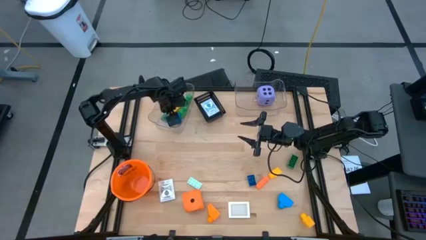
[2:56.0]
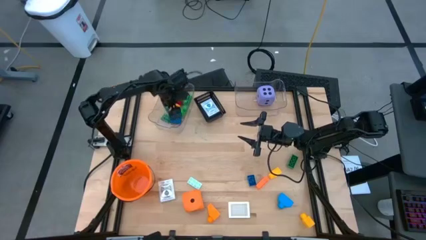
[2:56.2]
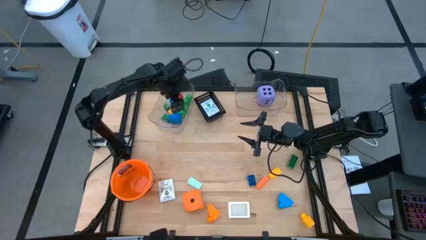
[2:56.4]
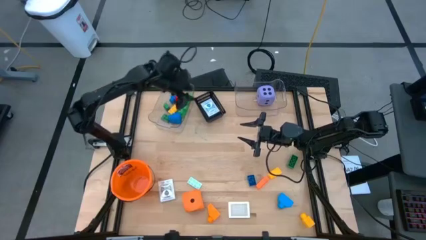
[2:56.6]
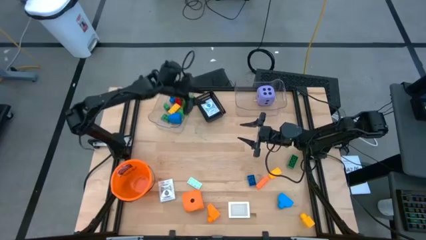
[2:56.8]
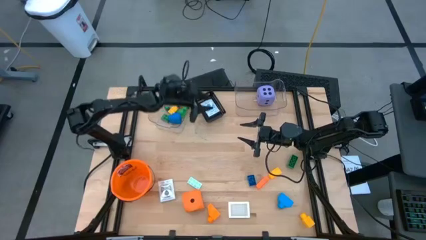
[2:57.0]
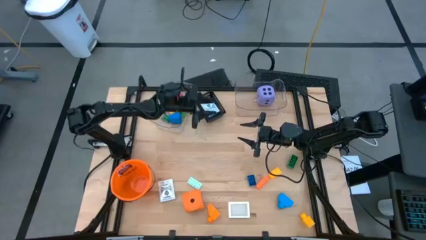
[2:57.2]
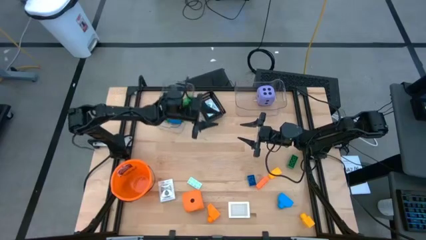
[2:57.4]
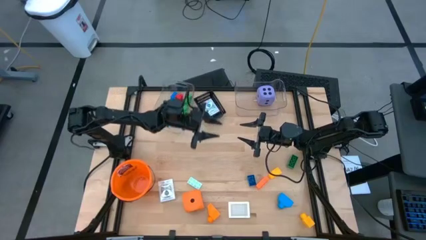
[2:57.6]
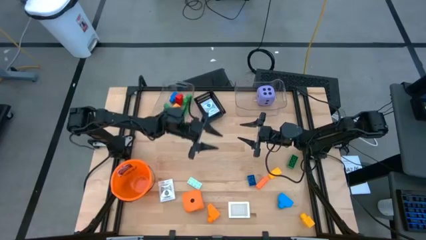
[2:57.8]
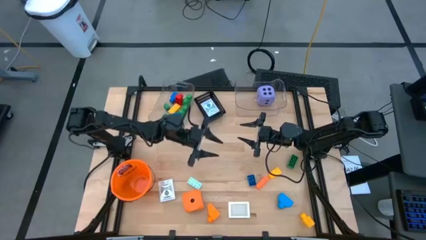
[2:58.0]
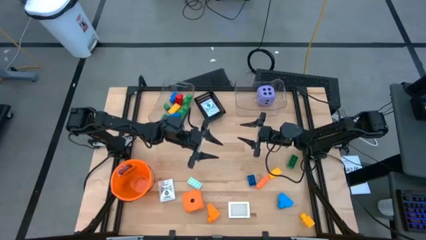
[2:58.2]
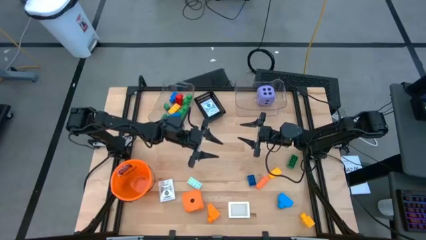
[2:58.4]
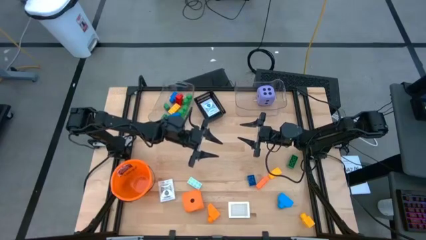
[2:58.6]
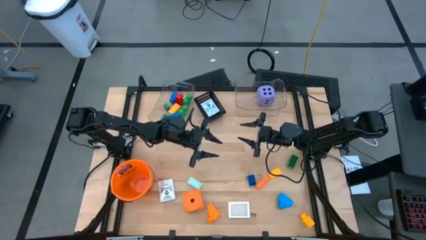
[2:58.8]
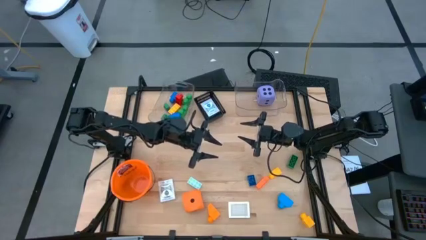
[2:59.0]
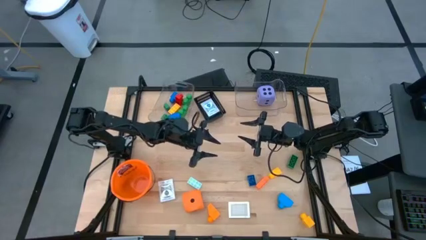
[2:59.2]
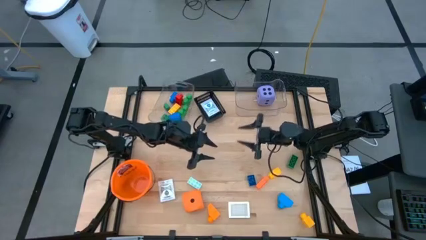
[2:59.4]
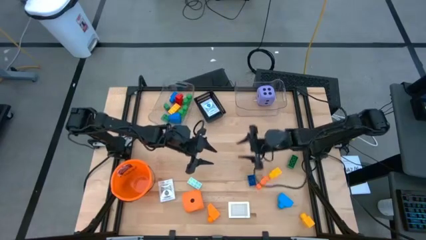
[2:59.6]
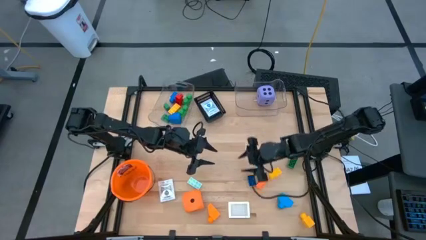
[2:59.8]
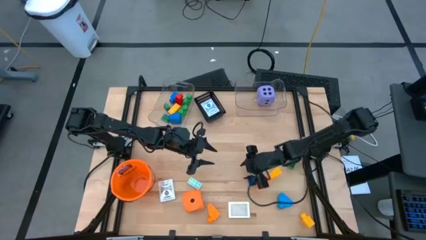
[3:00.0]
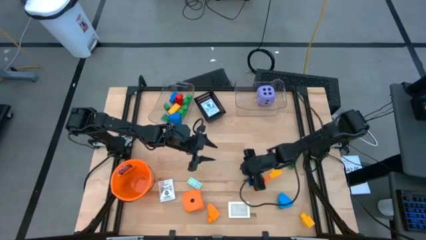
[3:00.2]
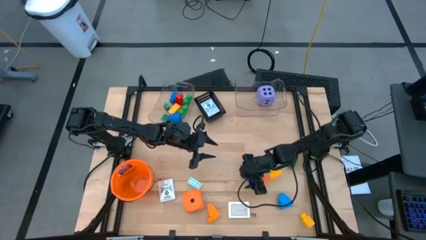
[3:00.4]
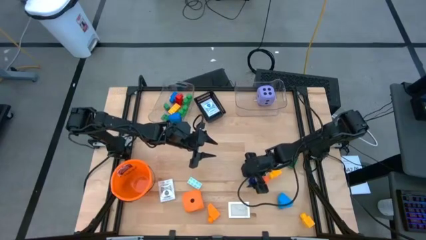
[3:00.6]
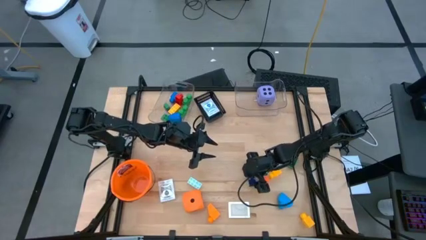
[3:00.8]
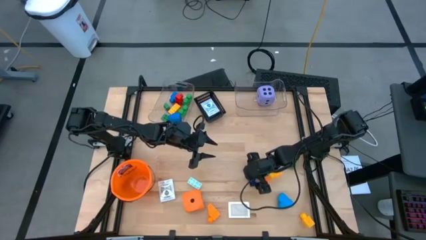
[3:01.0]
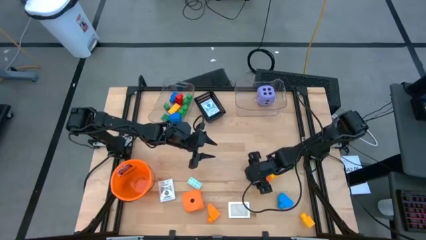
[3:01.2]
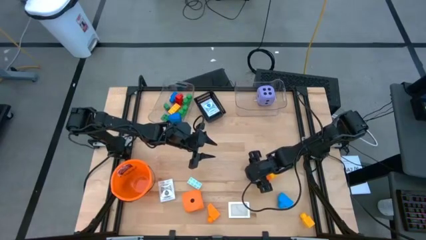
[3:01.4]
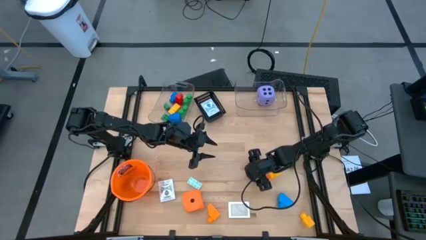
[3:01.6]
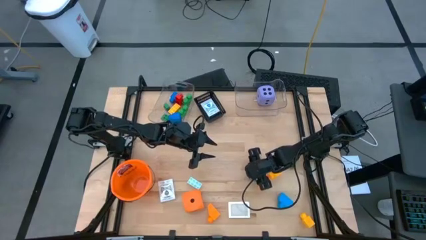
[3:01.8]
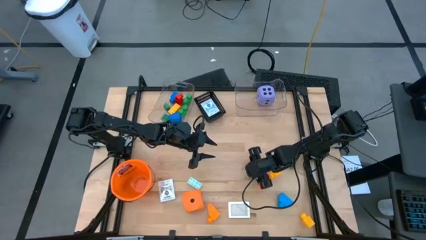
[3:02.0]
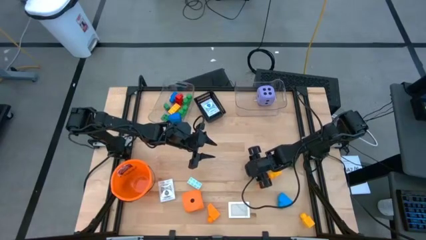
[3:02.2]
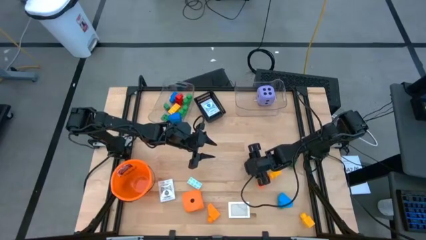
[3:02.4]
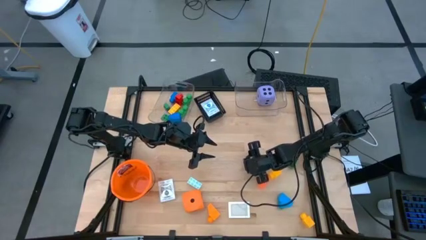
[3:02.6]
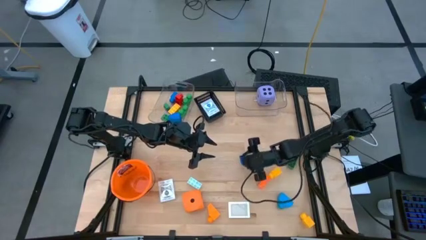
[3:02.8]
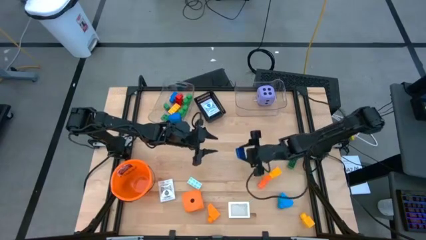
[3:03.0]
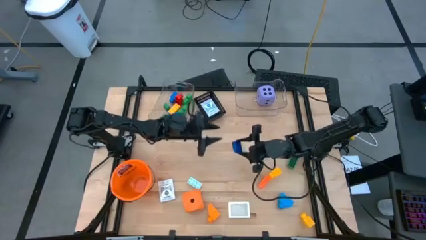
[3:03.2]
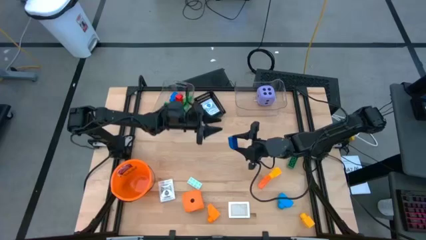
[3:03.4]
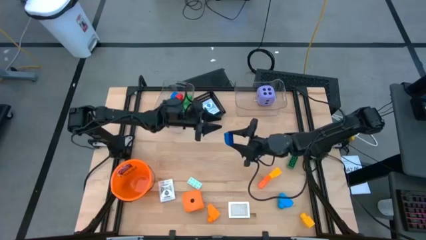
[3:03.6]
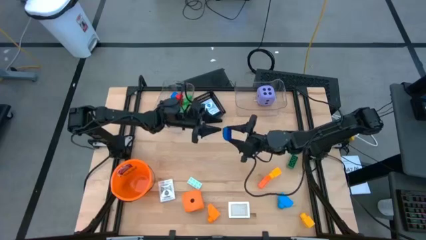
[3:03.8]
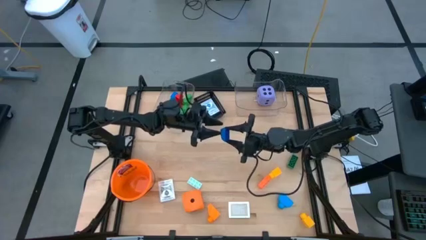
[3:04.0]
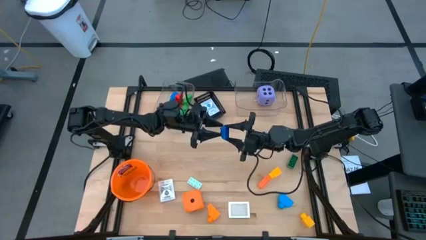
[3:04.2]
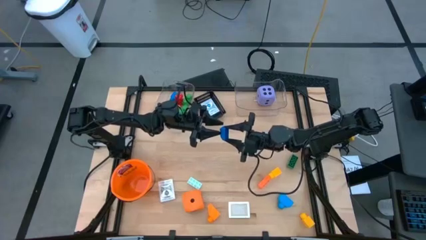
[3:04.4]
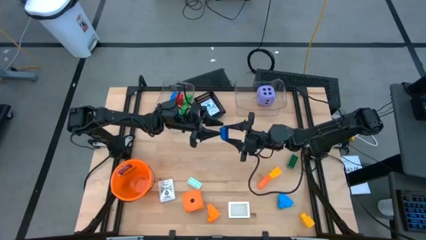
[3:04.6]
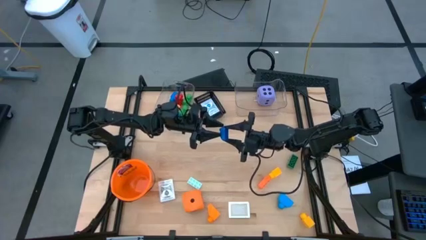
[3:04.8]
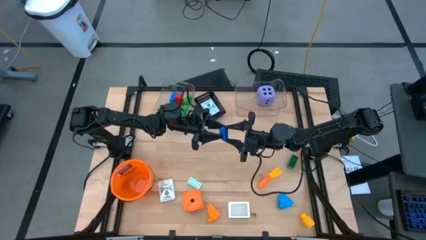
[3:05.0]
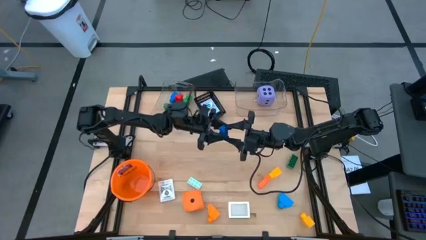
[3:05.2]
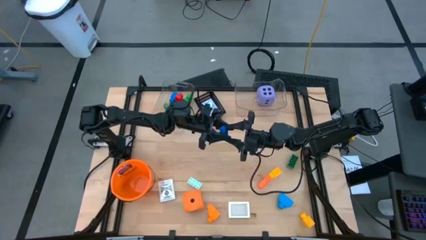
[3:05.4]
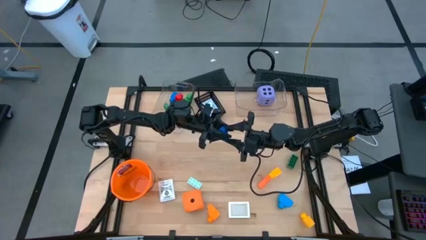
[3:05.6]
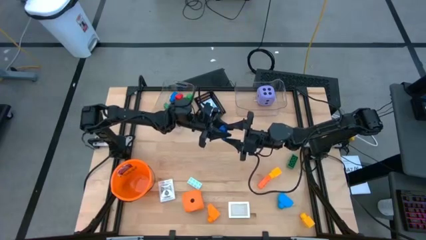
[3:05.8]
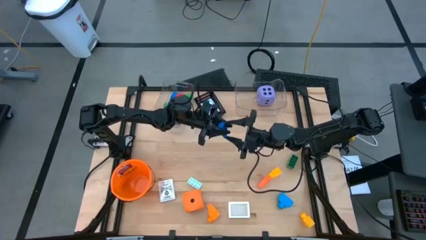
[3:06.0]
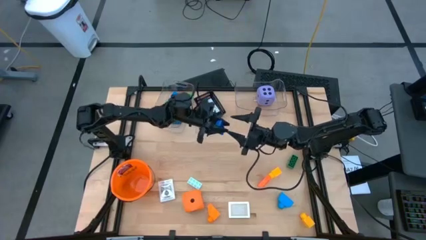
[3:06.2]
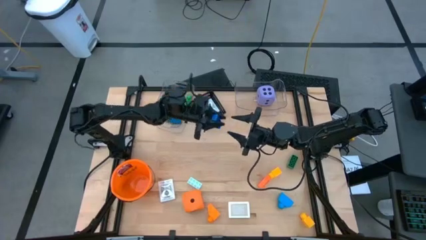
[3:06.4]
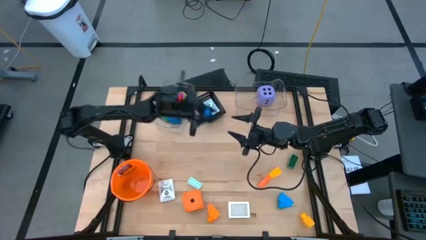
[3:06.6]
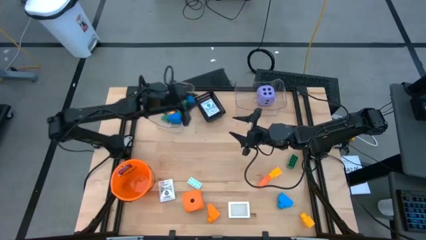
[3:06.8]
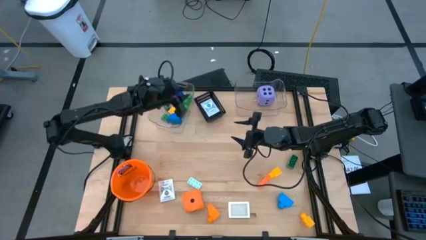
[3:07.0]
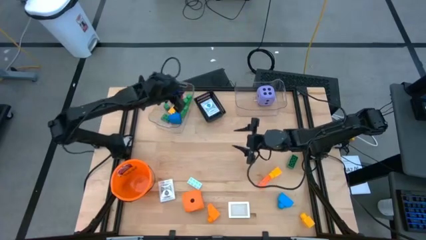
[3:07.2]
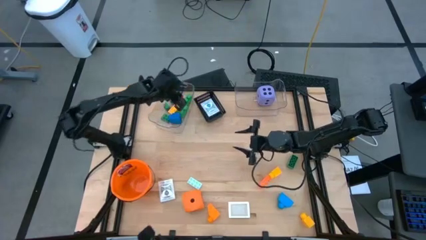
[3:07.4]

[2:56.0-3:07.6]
Task: Pick & Place Toys
Put the blue gamepiece into the left transparent bin
